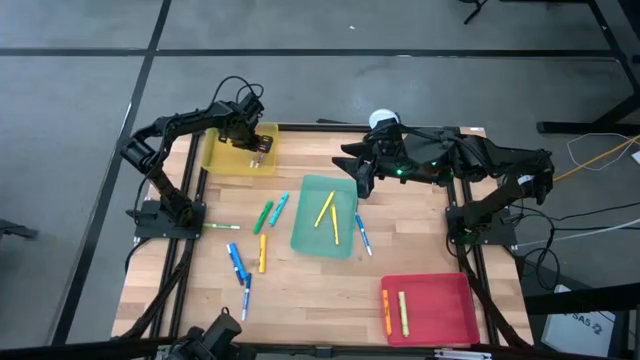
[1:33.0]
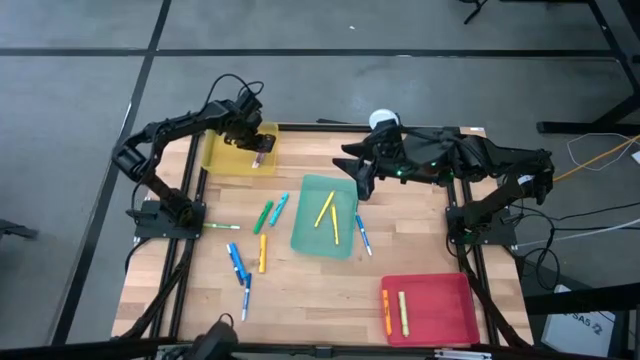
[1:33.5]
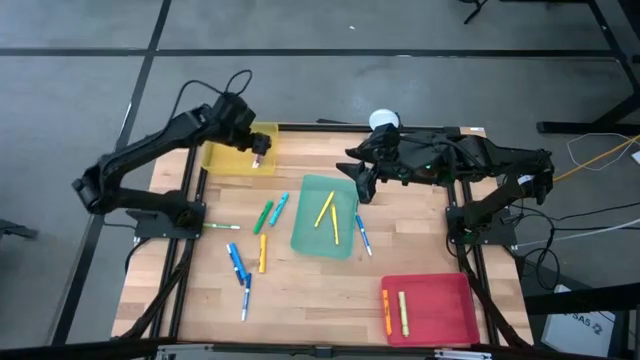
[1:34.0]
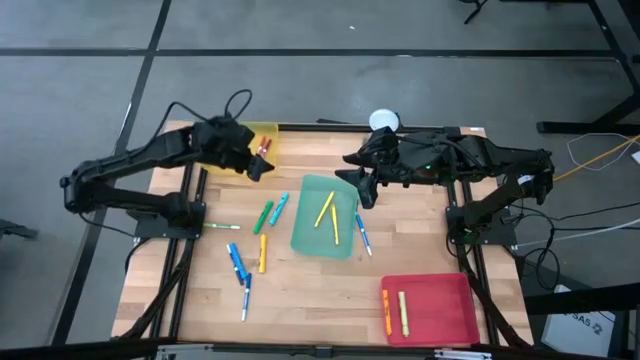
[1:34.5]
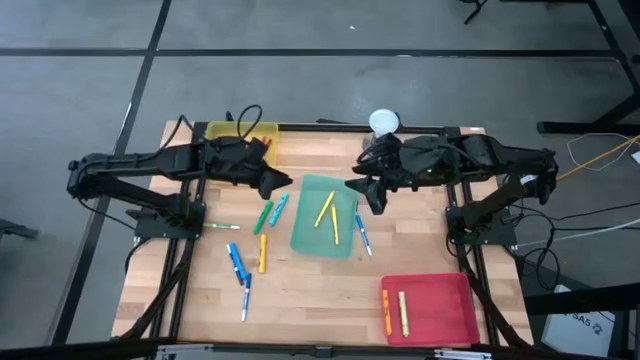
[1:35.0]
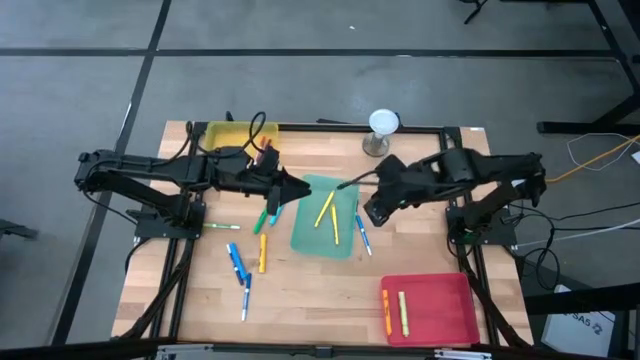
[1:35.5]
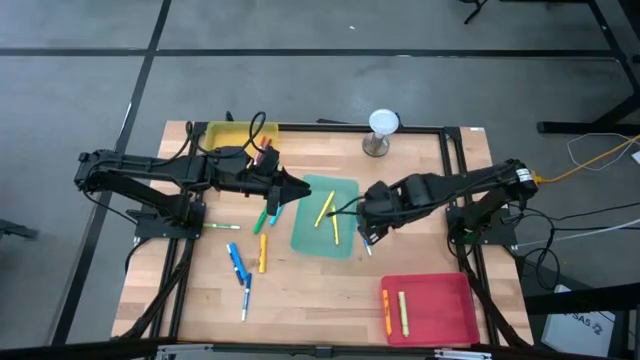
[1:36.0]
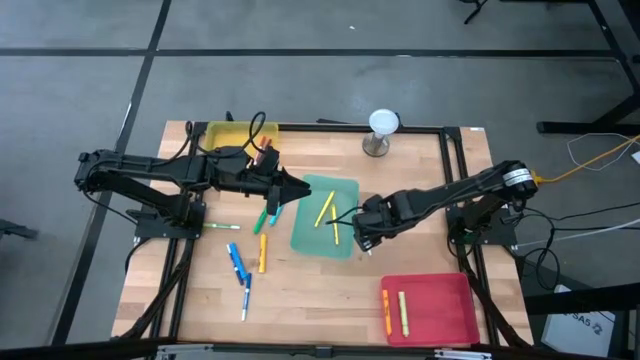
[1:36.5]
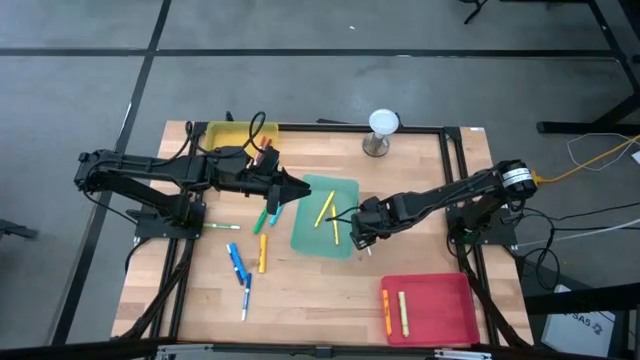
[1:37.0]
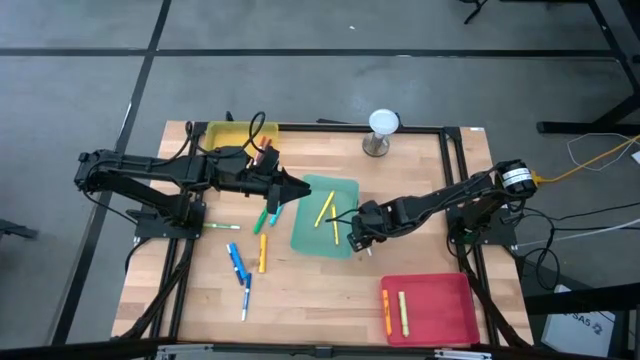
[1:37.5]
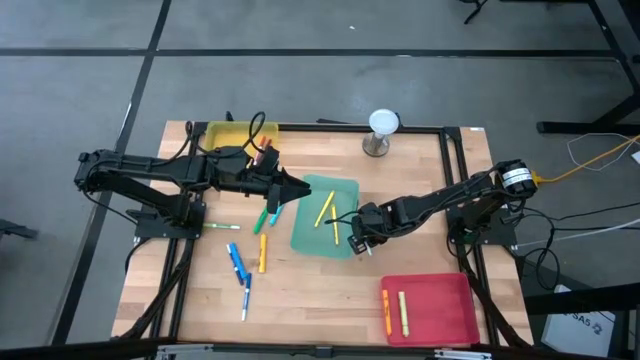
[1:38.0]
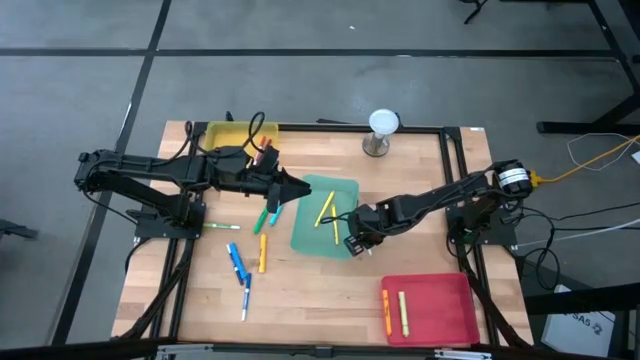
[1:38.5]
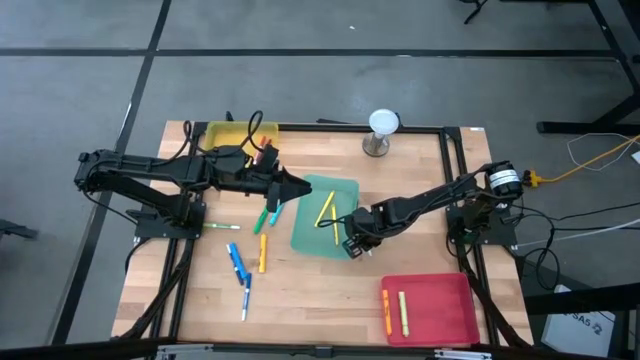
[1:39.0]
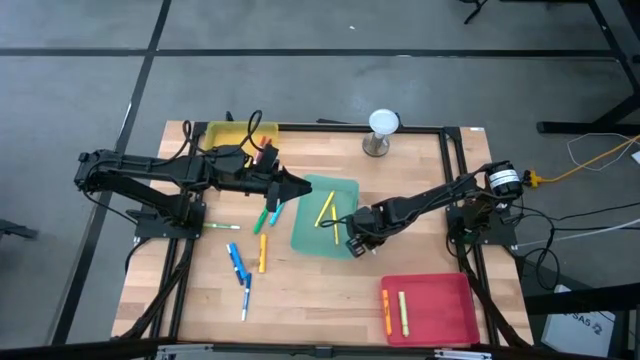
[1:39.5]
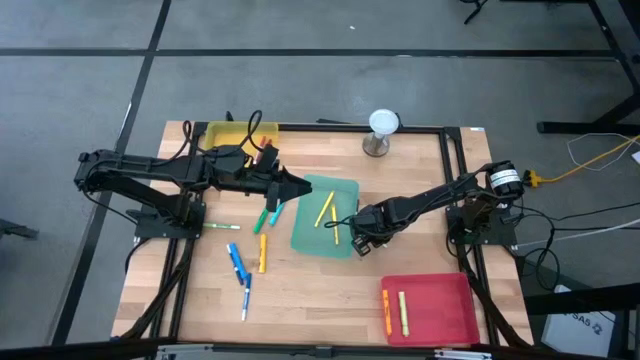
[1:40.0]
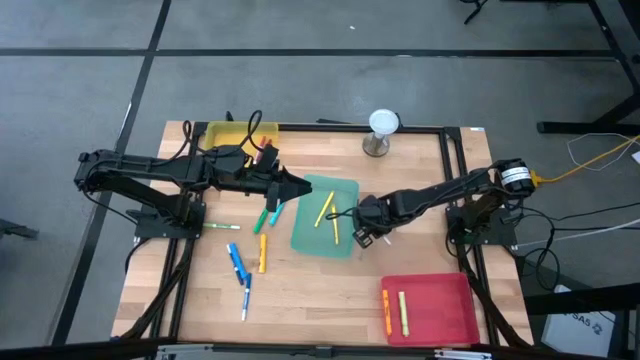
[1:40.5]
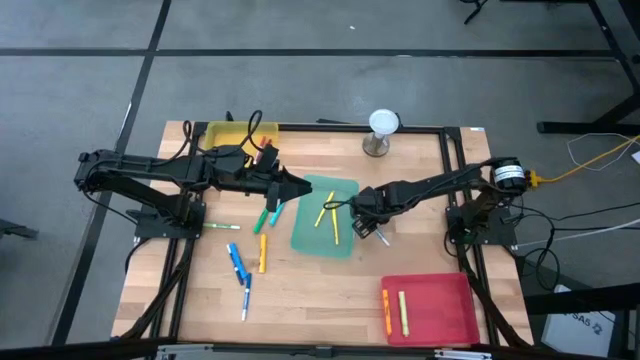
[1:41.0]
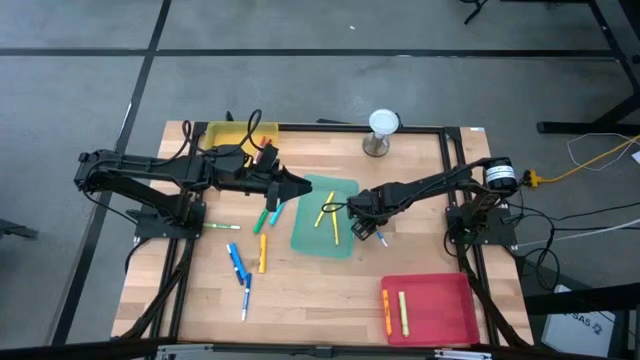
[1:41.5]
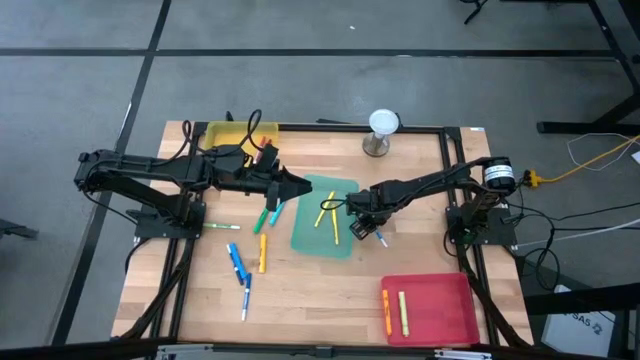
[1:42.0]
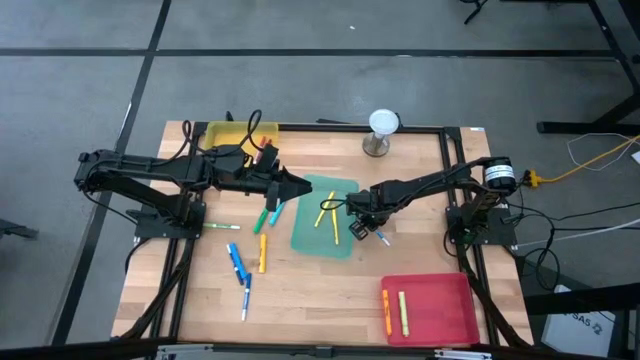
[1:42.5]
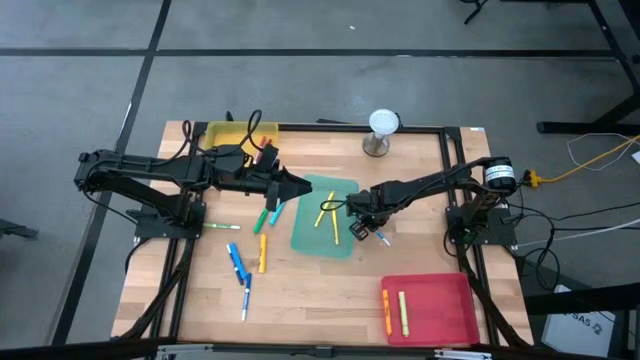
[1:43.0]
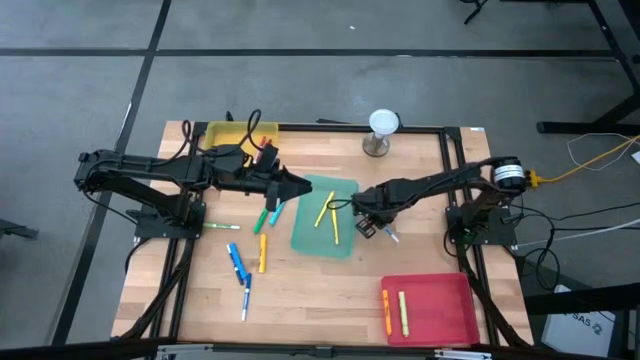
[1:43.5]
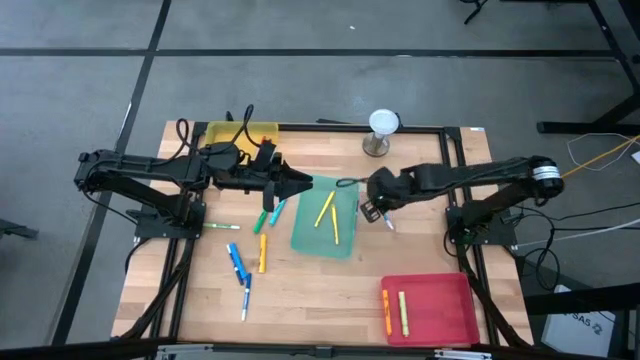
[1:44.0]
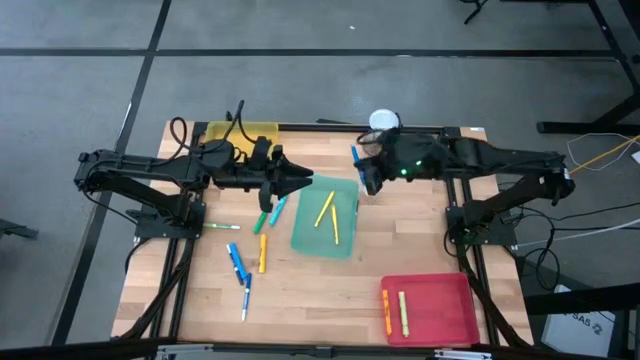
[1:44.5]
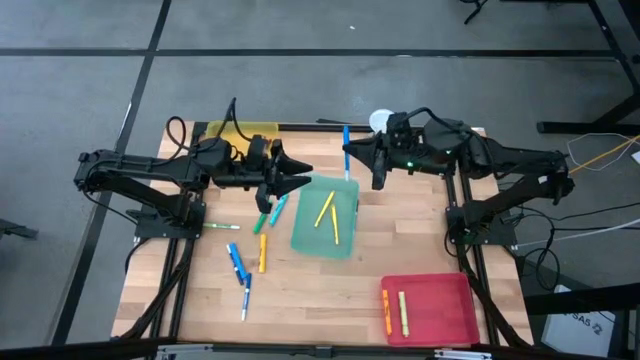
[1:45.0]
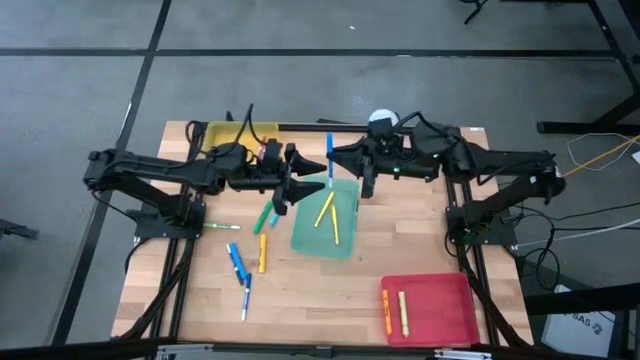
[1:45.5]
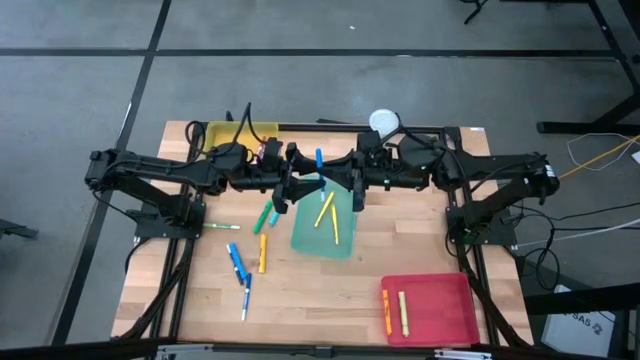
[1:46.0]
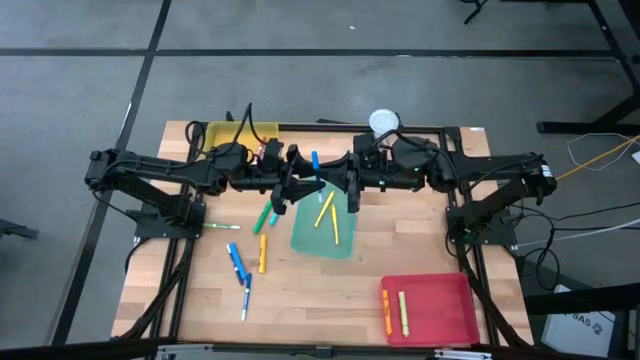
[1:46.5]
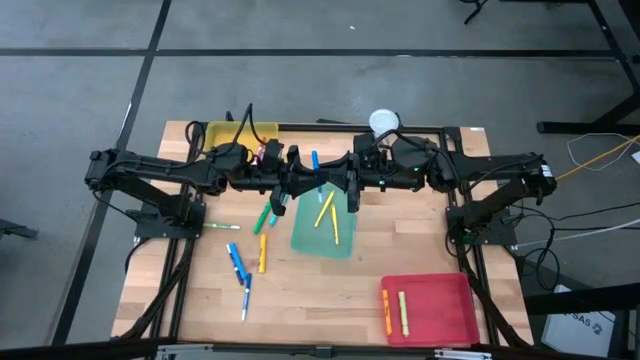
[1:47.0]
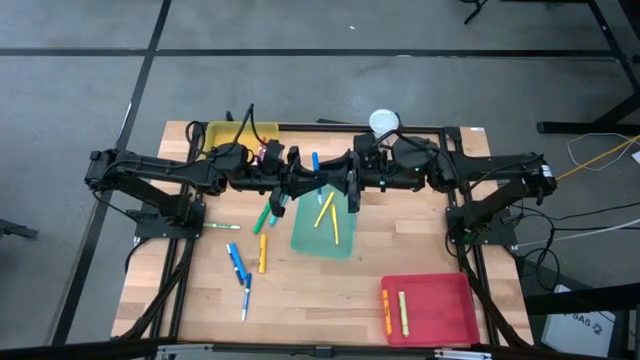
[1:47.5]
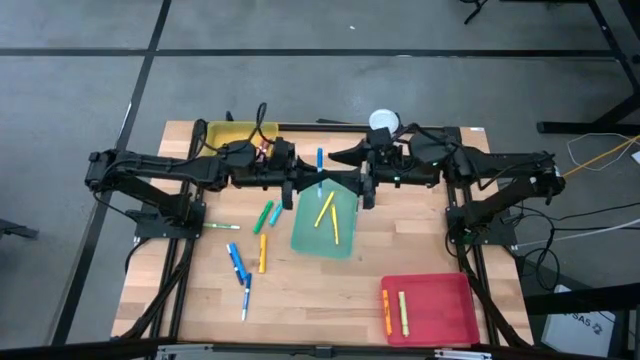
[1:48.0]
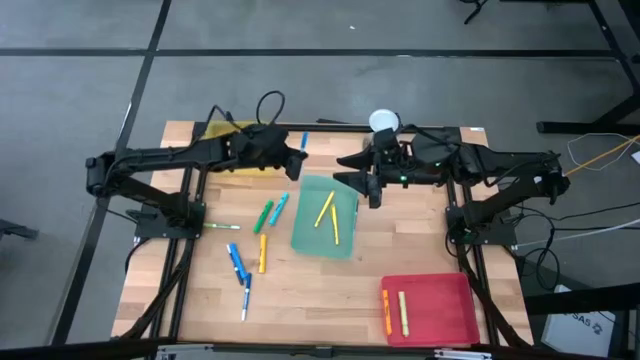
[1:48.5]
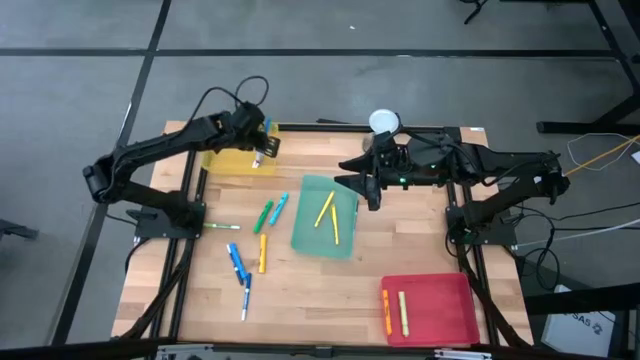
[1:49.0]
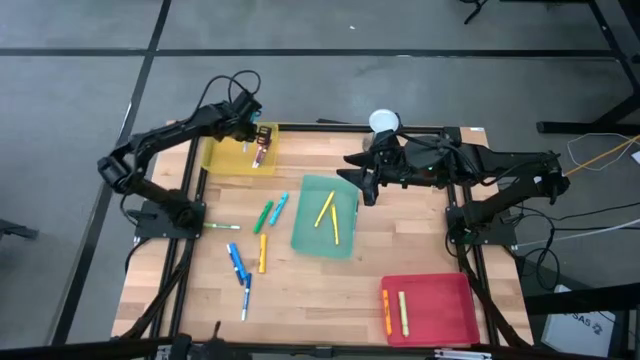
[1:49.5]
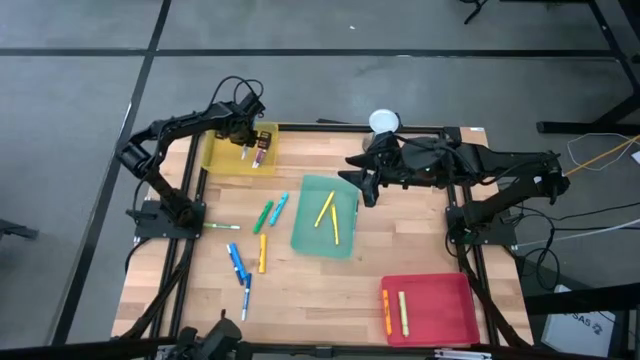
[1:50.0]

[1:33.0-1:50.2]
Task: Pick & Place Markers
Put the light blue marker pen into the yellow bin

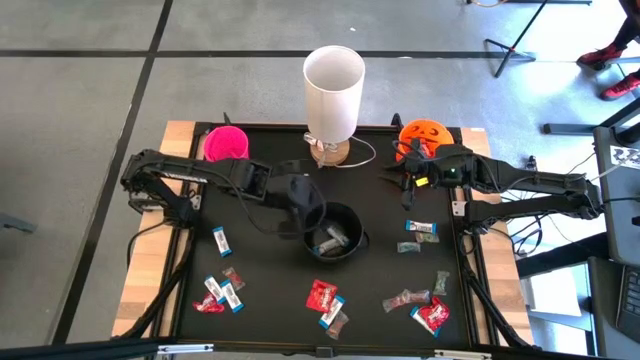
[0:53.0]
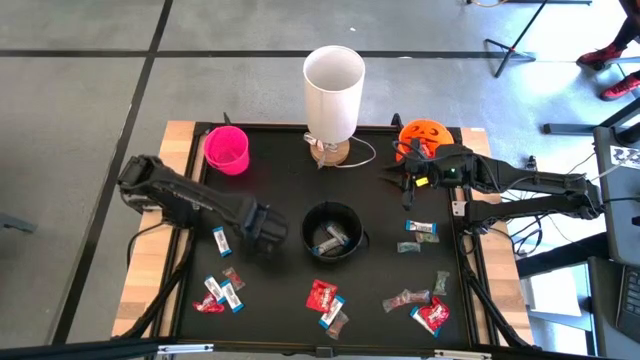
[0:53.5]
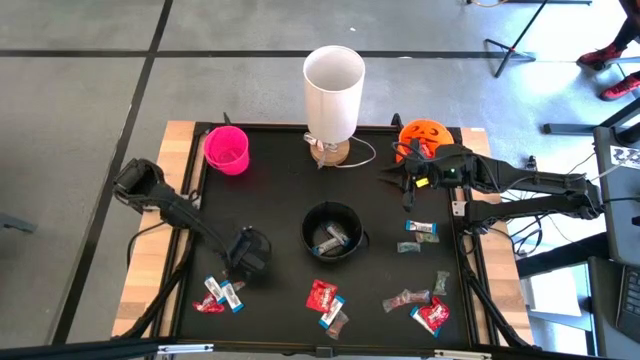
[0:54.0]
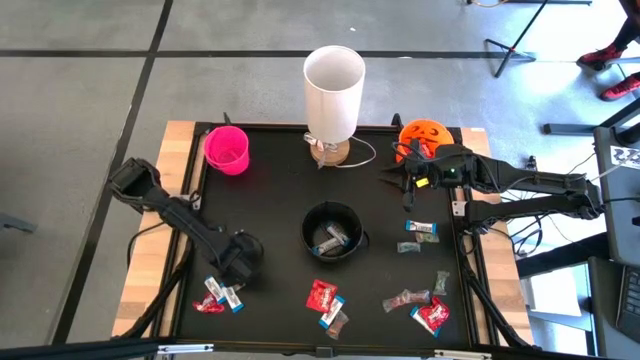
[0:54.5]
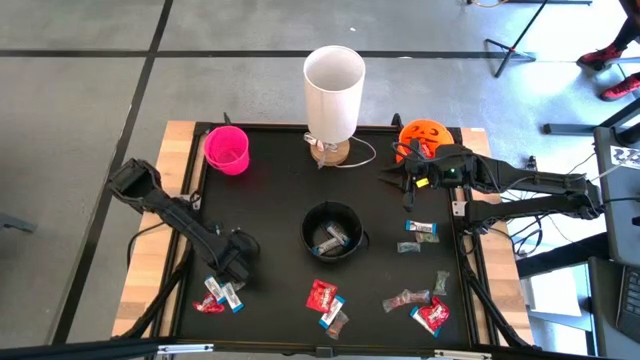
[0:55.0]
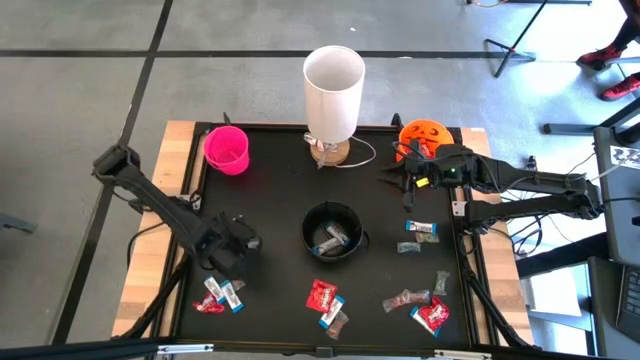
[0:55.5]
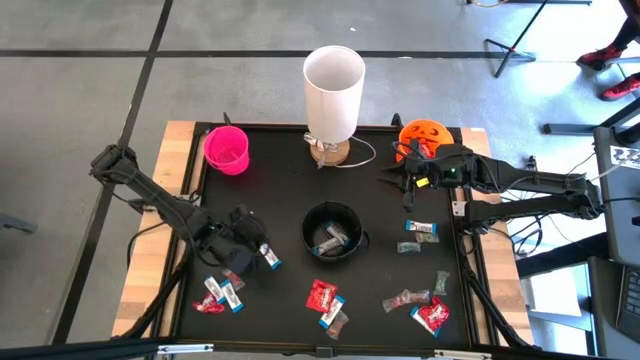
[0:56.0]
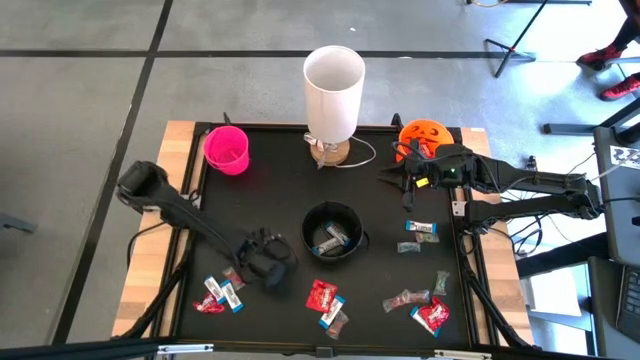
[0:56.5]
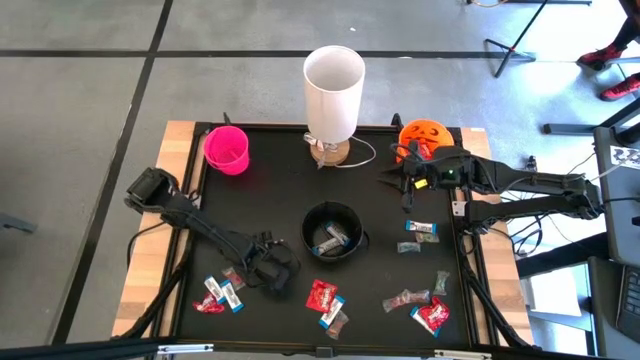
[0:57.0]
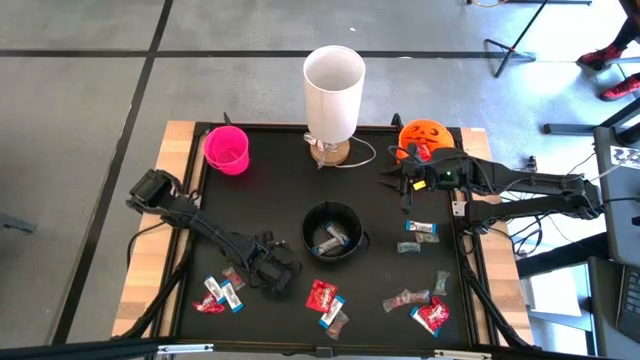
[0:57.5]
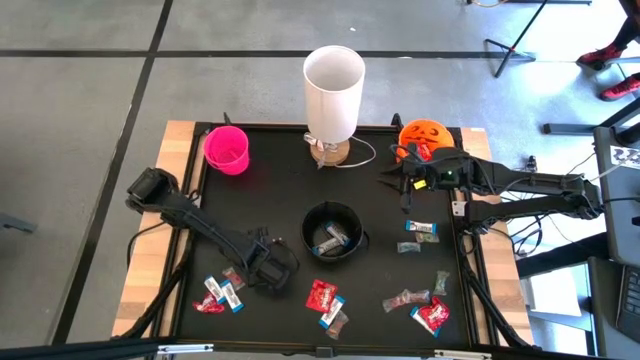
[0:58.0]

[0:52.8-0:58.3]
Task: Sort candy
Put the white chocolate into the black bucket
